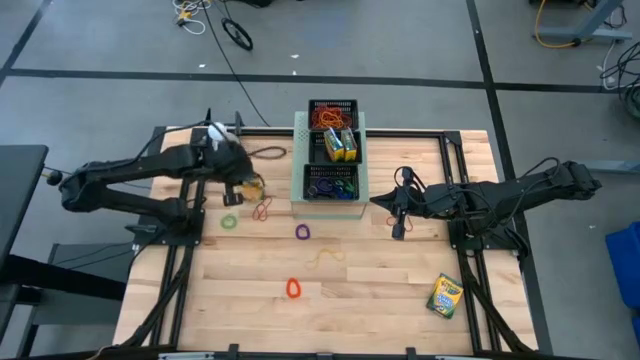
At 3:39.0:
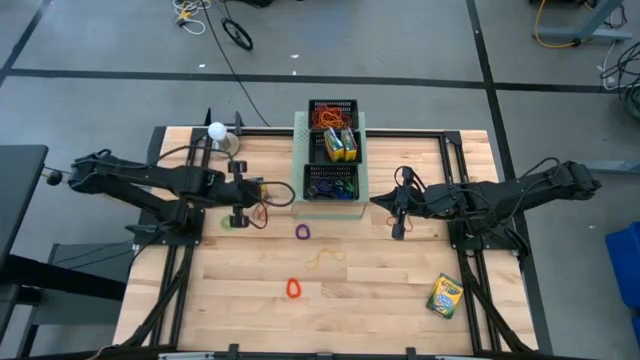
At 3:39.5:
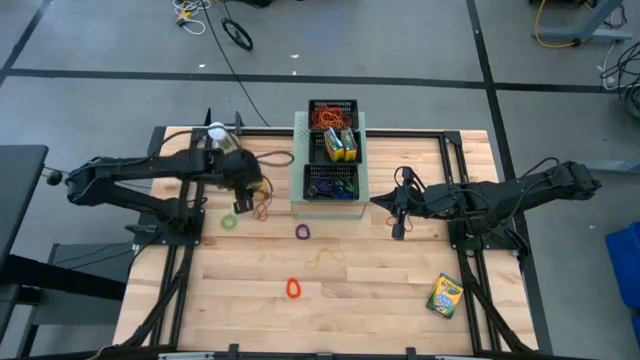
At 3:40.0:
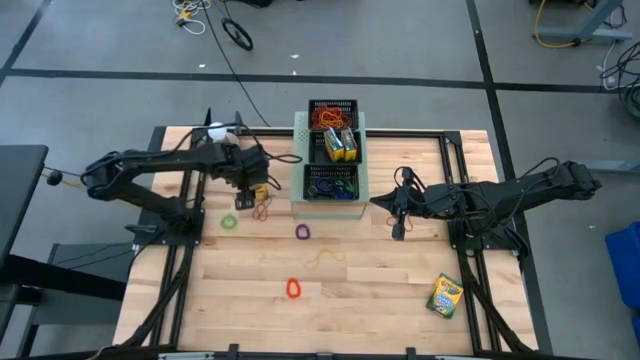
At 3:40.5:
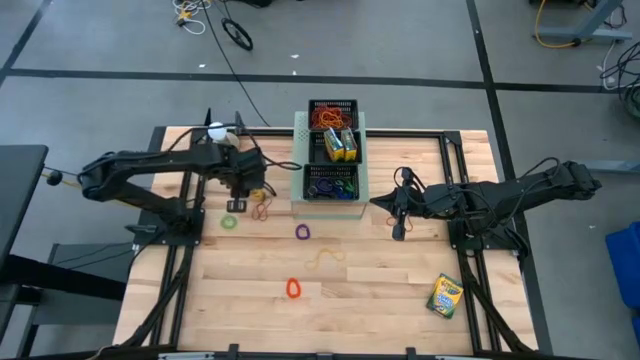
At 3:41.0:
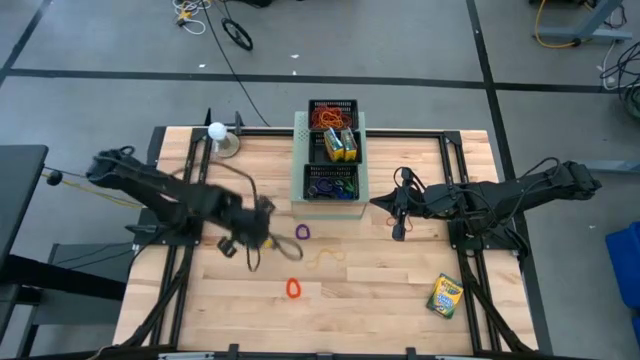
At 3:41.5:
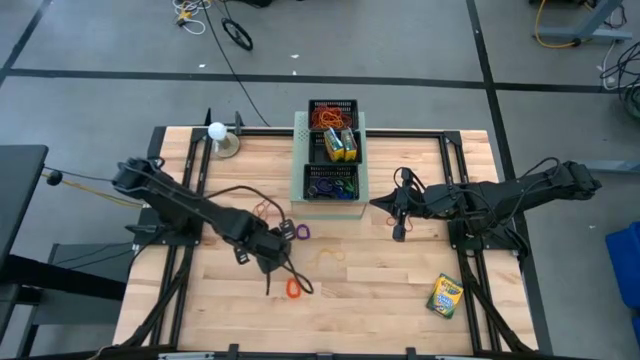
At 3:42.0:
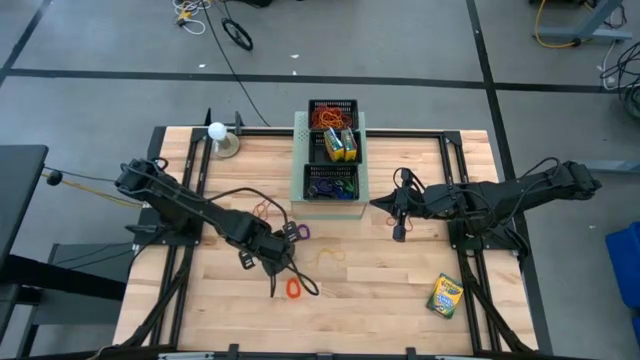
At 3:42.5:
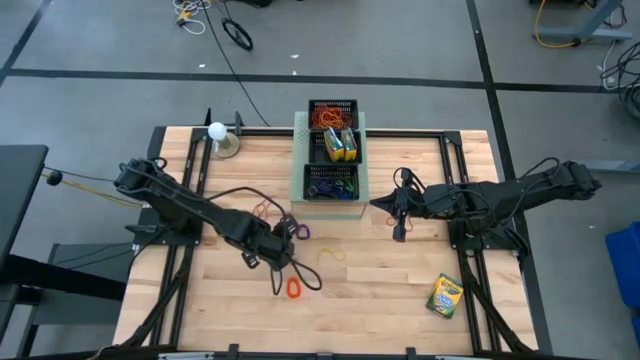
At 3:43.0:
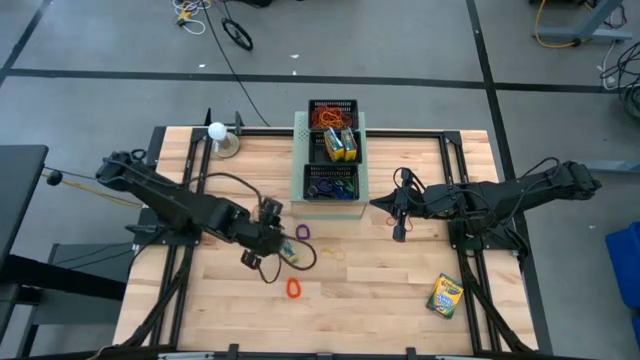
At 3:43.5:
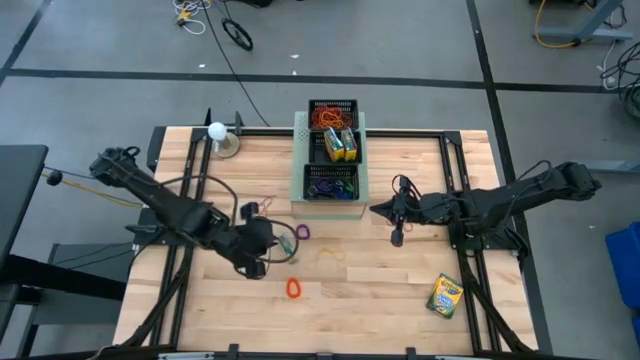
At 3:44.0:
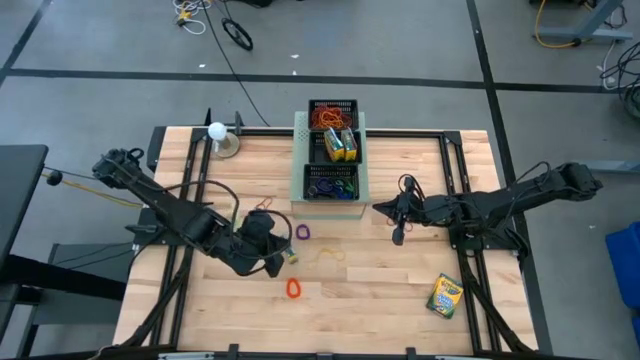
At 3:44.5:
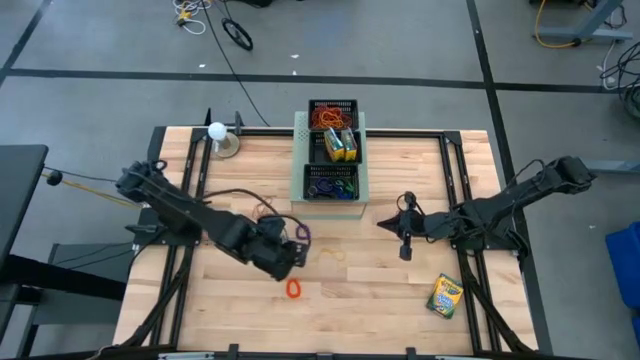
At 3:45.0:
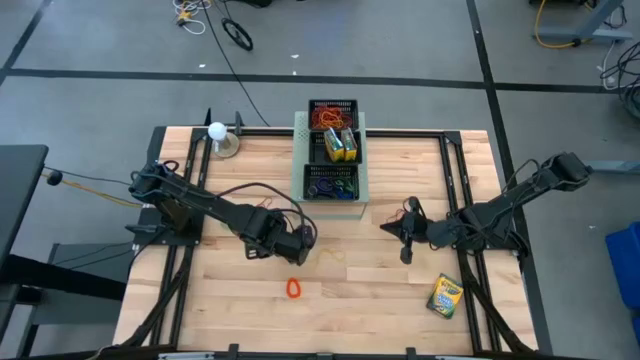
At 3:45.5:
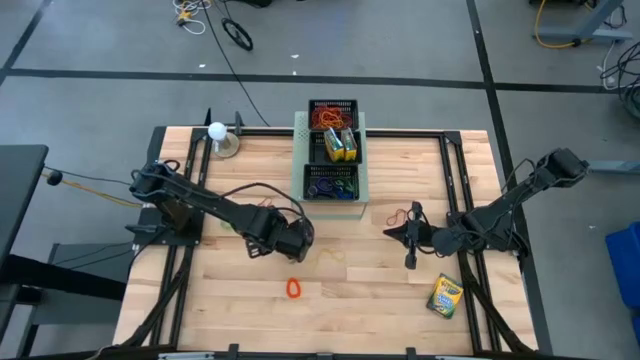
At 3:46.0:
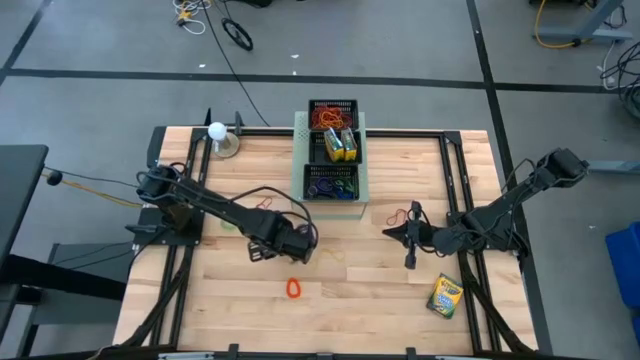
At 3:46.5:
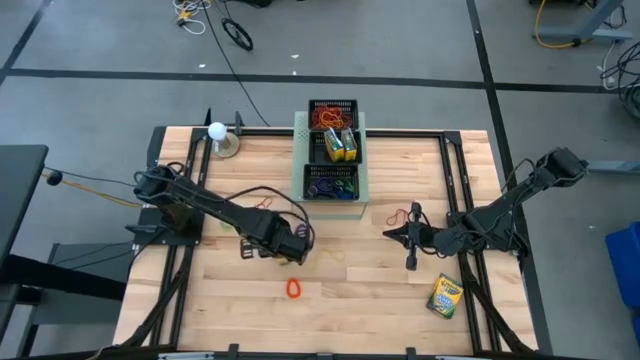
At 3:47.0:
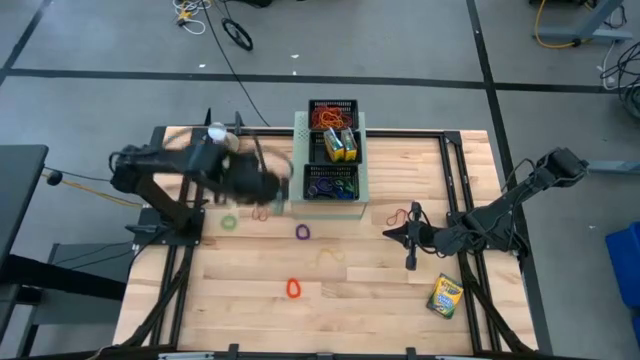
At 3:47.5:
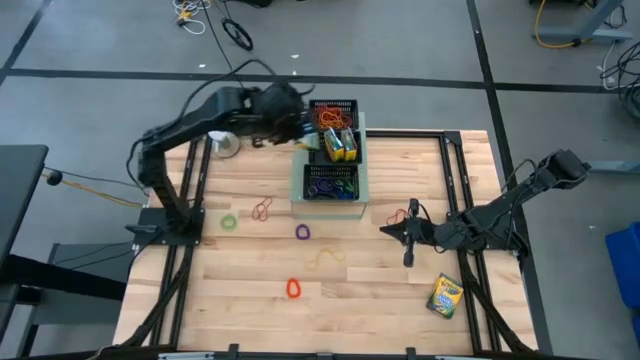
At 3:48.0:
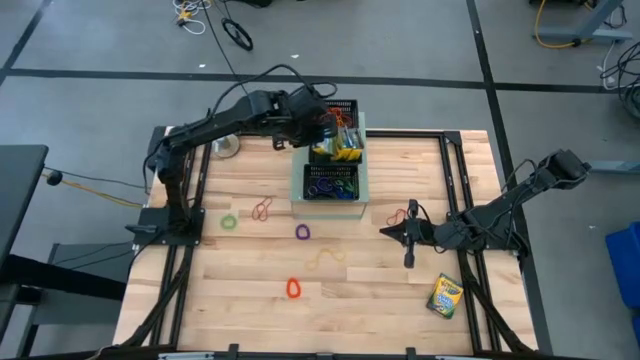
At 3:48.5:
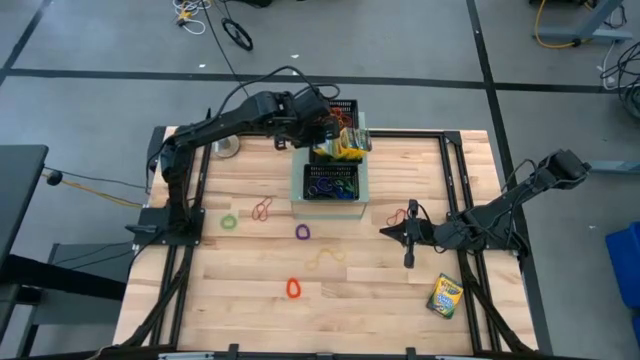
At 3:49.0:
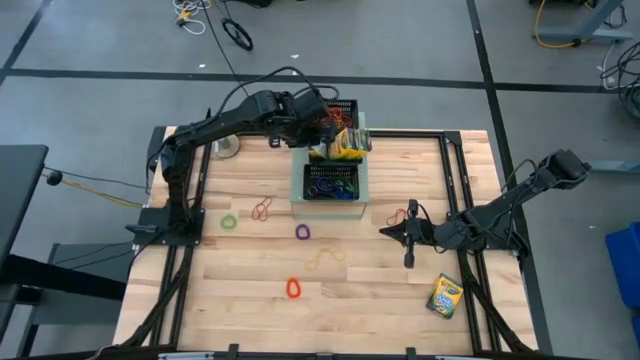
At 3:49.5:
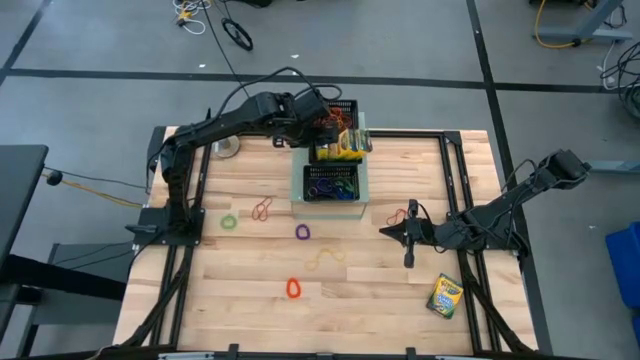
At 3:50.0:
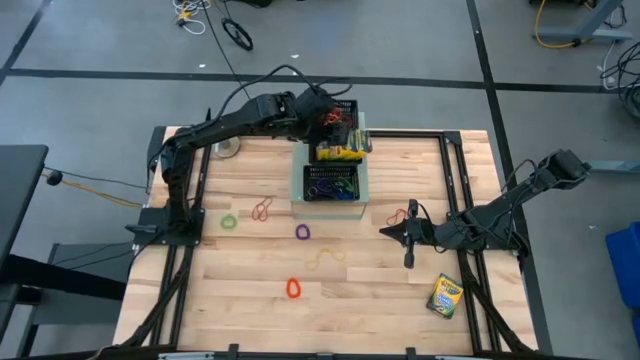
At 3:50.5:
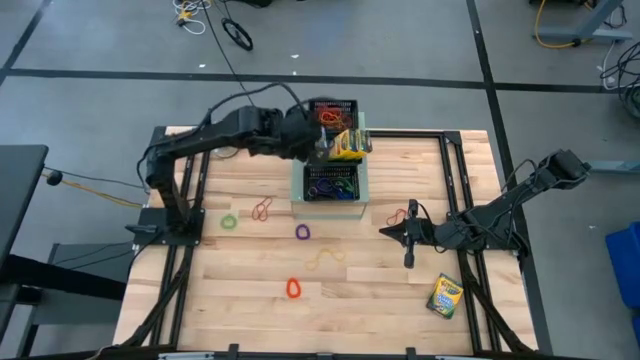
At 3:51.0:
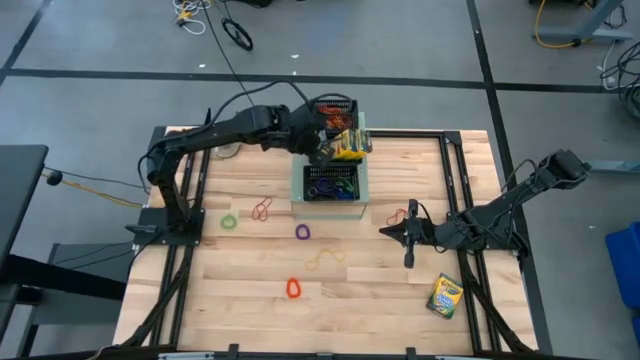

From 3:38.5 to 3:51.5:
Task: Pick & Place Office Desk Supplies
Put the top yellow crayon box into the middle black bin on the shelf

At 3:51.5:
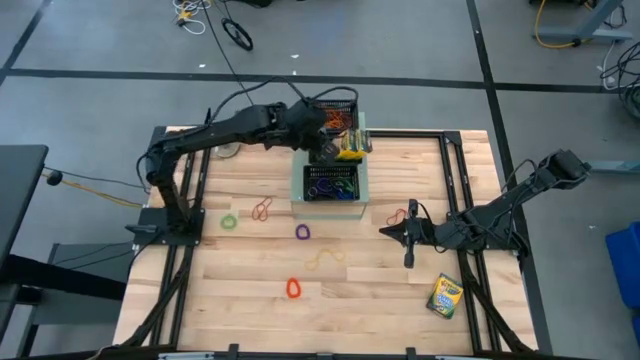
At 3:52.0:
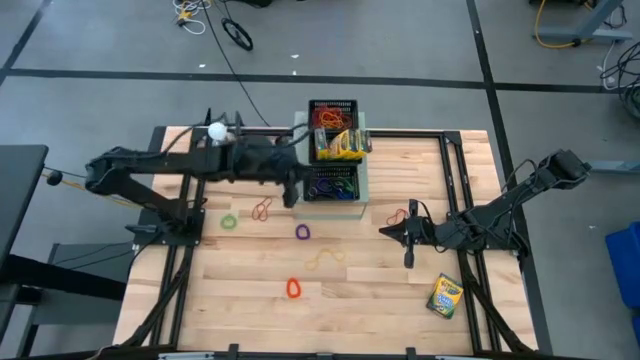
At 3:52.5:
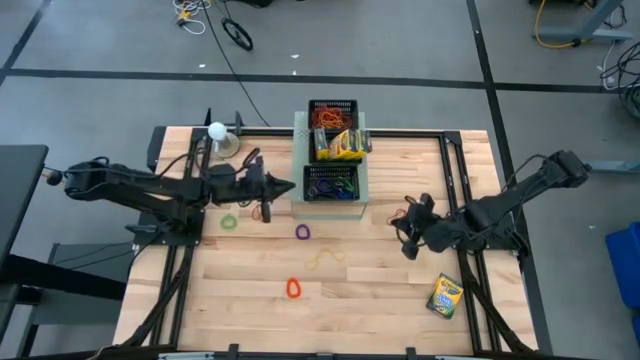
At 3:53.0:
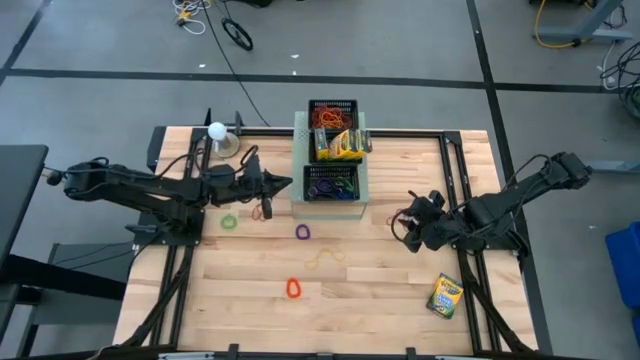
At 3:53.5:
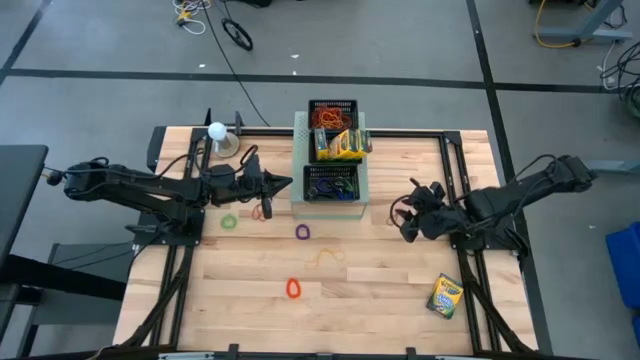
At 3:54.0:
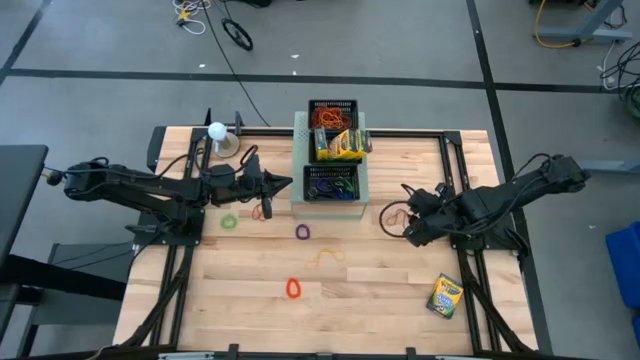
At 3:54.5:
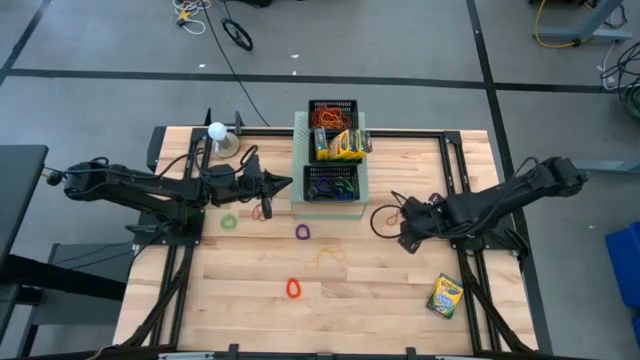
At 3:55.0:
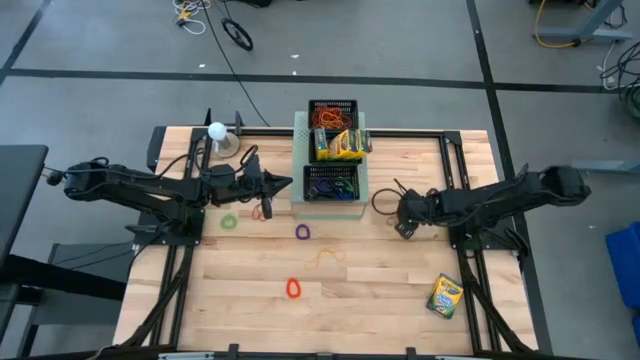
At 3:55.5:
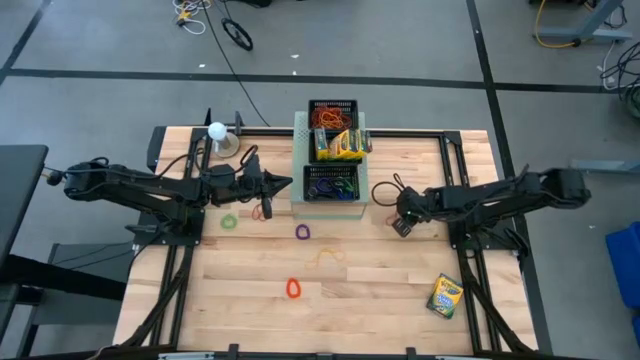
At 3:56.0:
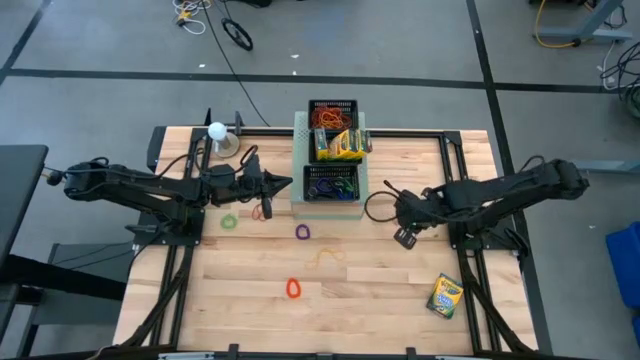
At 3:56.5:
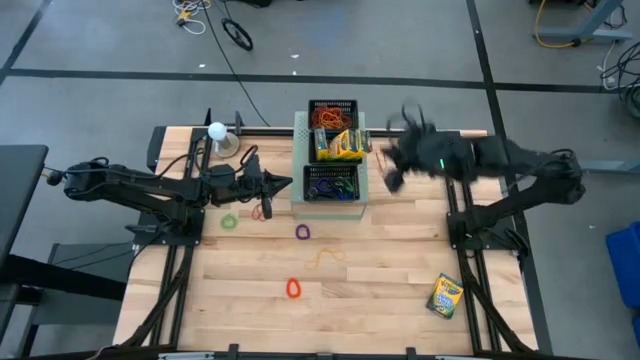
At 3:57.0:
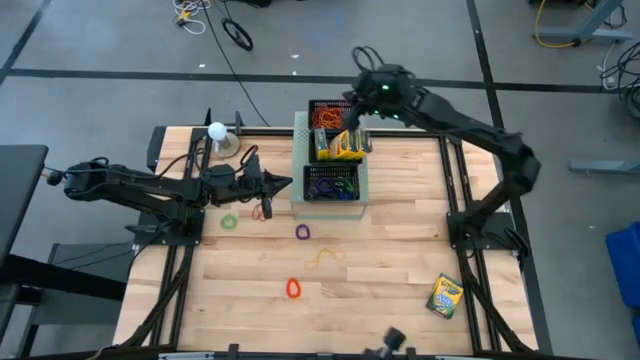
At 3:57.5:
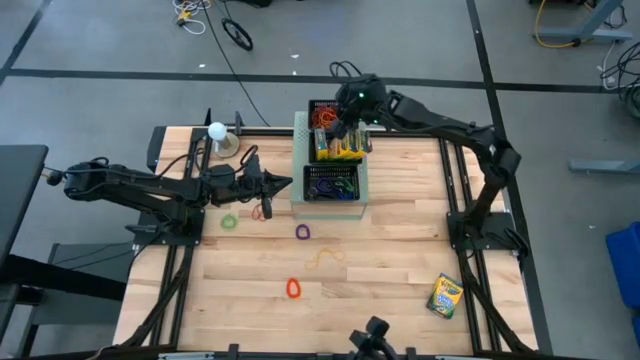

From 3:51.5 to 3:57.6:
Put the red rubber band into the top black bin on the shelf
